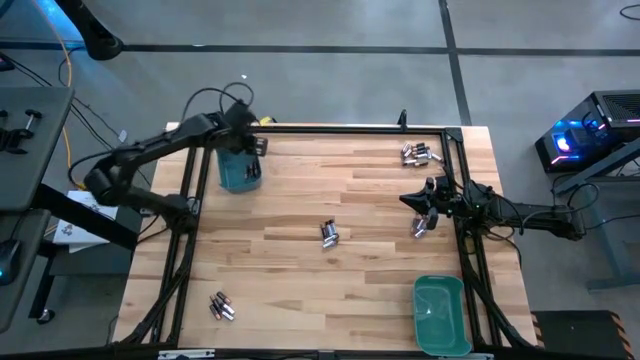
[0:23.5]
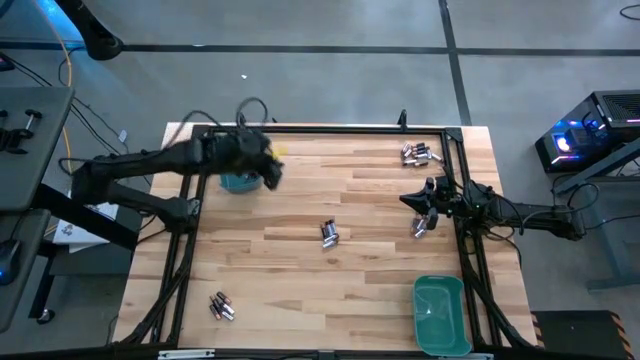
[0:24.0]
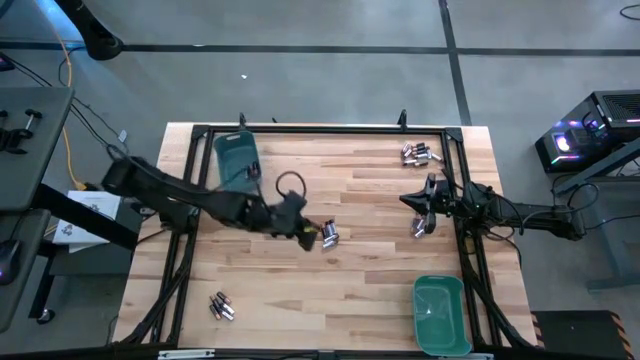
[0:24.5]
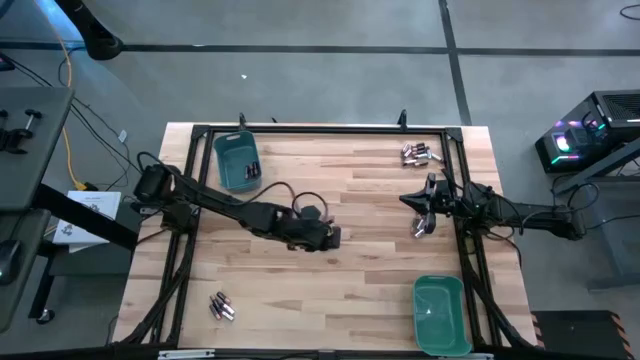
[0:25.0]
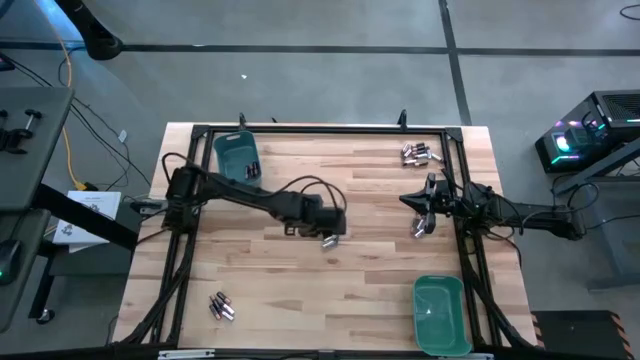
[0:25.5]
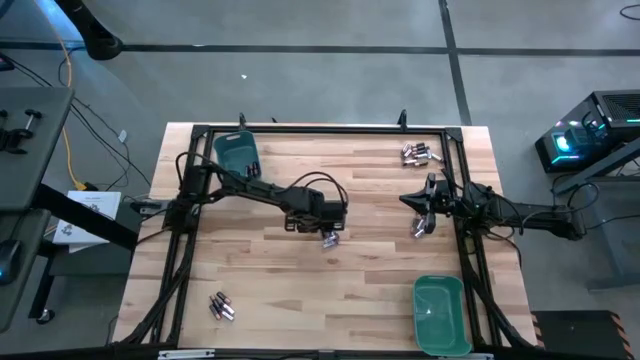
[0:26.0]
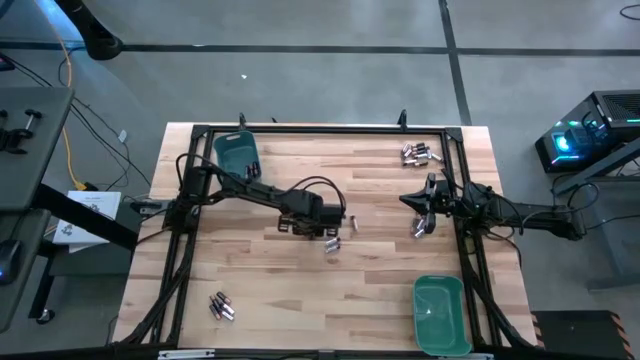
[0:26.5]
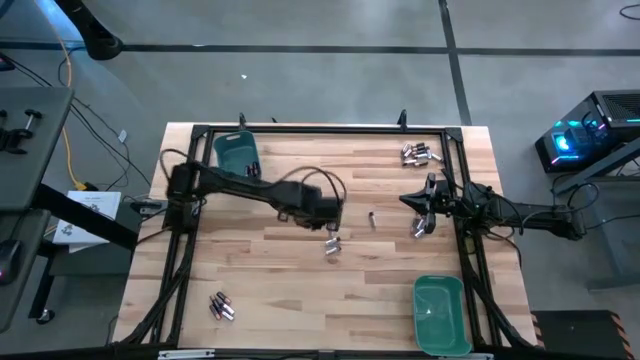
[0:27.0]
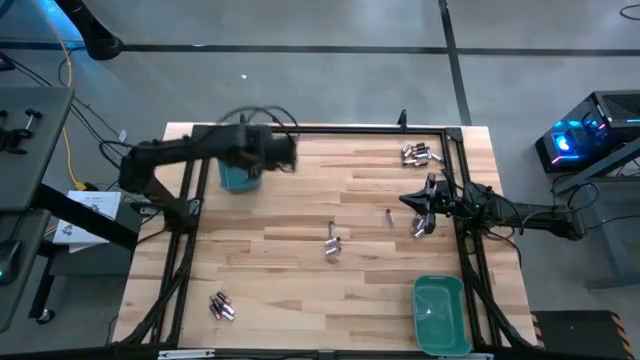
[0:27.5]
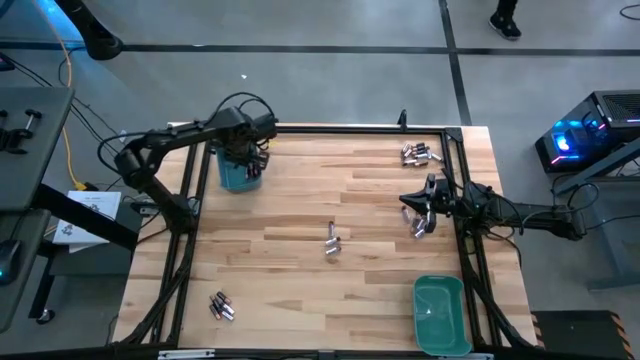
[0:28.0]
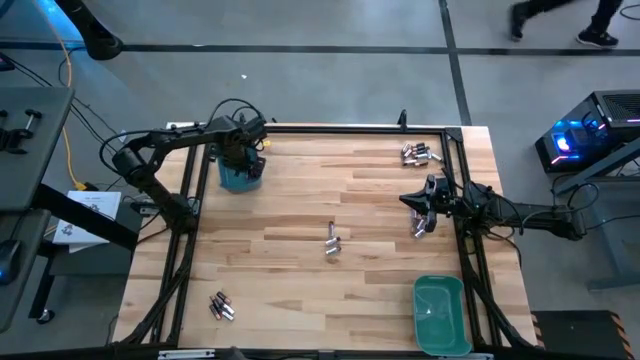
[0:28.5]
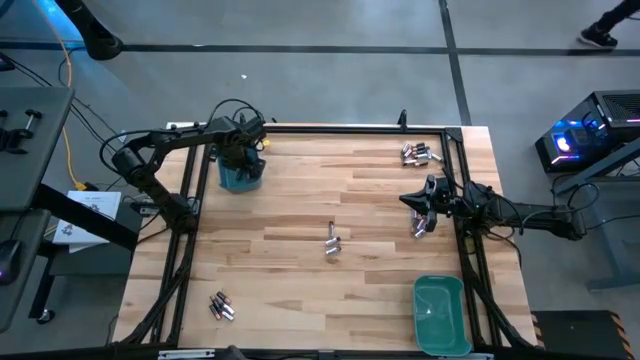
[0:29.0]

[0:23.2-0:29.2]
Task: Sort batteries
Put the black battery into the blue bin

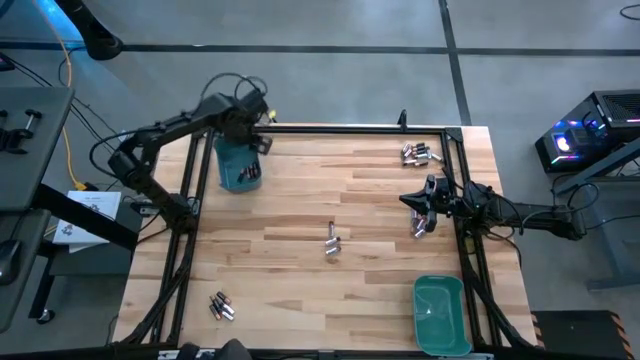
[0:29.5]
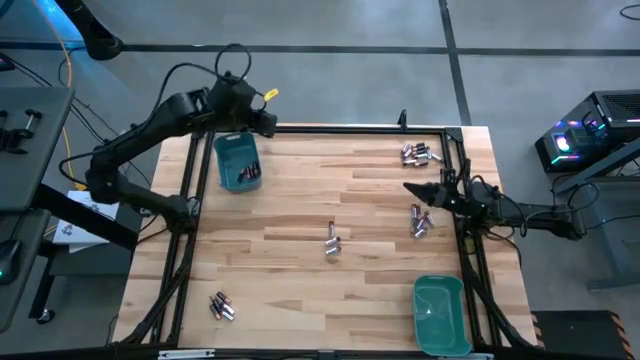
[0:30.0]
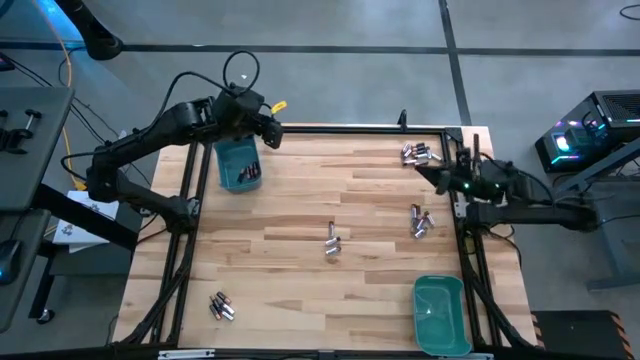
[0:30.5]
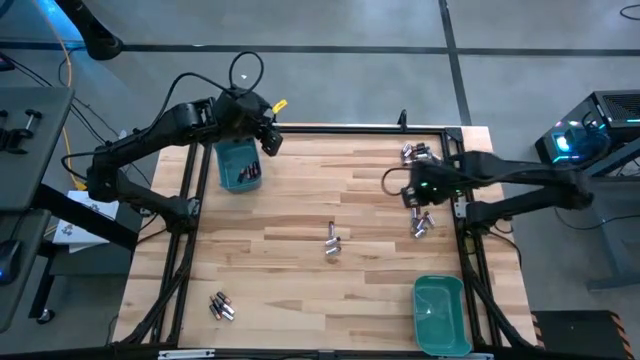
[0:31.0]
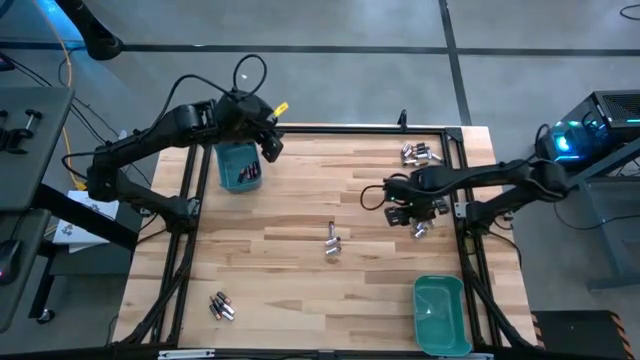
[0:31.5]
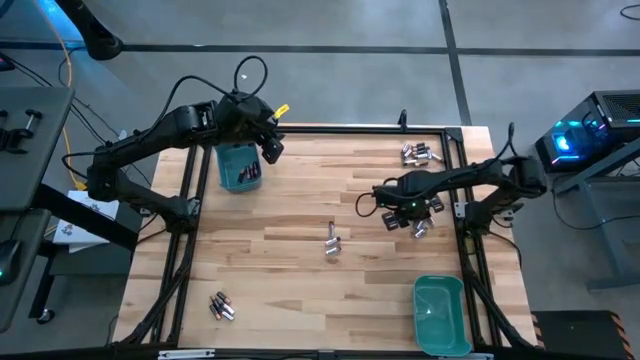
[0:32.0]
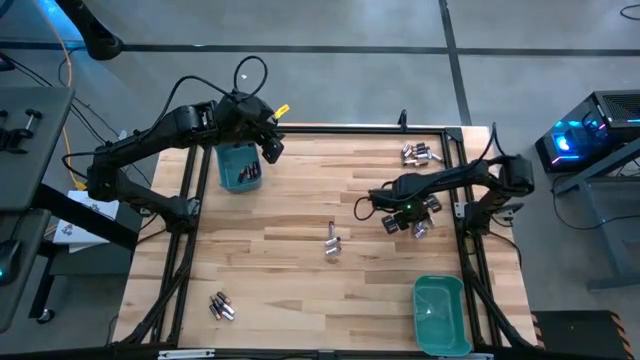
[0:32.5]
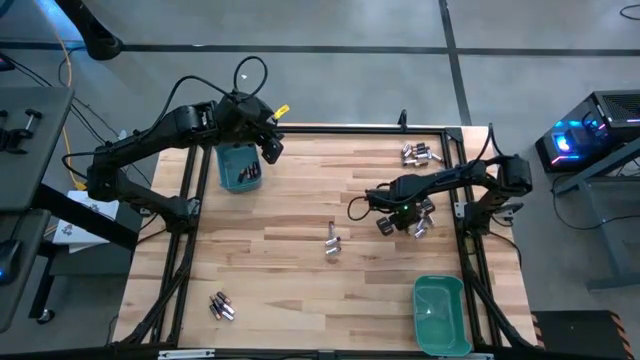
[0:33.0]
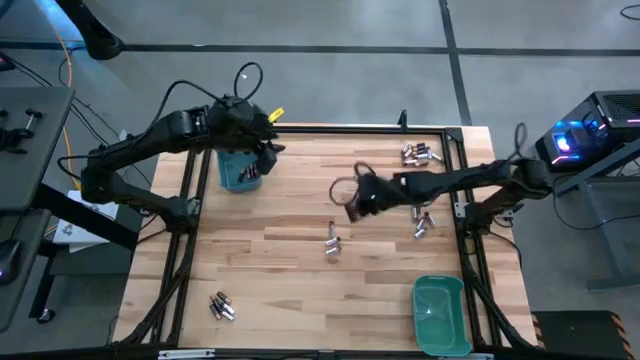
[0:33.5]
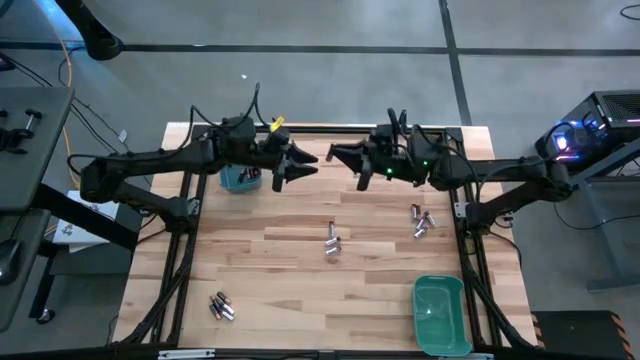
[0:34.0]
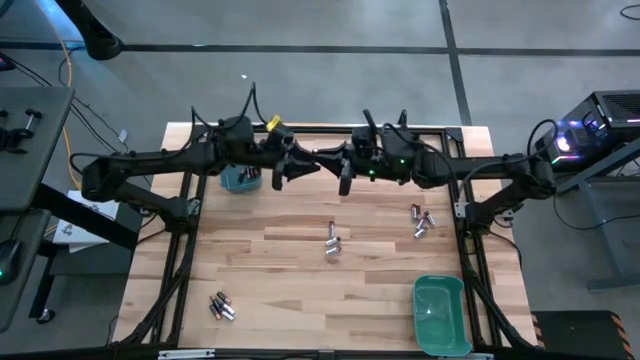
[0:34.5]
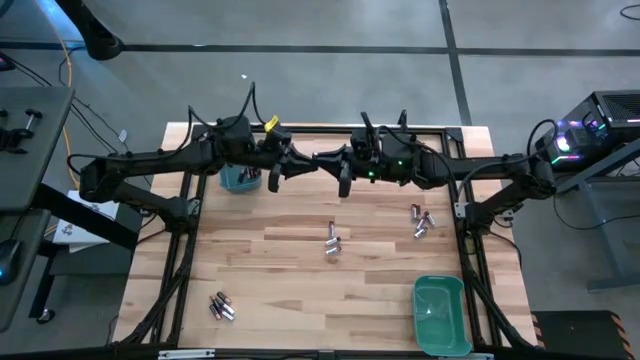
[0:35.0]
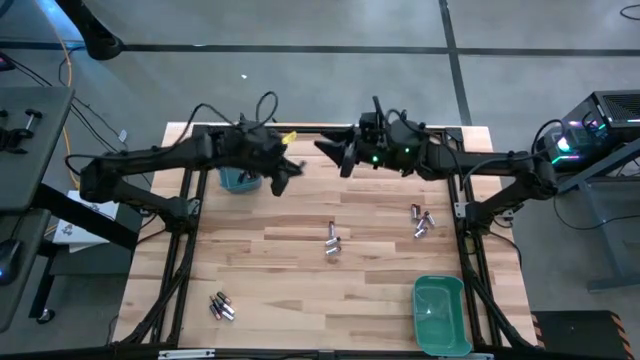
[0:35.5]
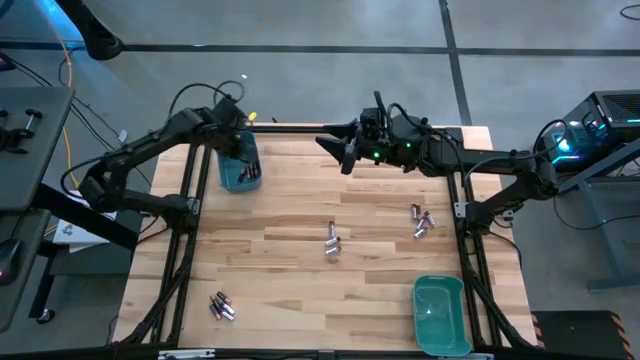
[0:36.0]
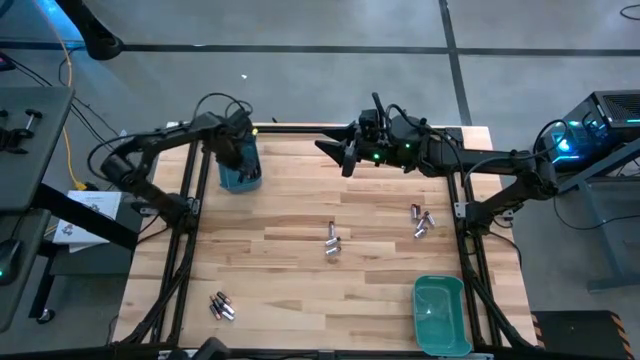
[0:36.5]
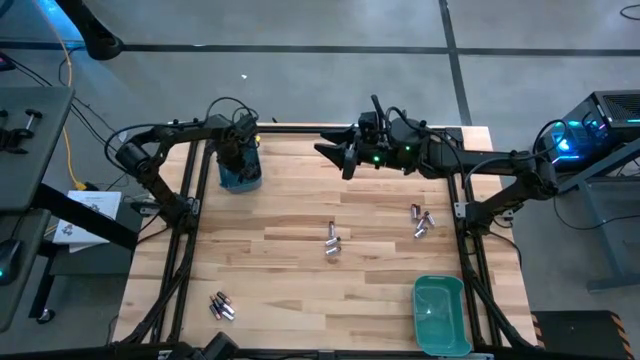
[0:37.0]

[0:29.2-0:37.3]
Put the black battery into the blue bin

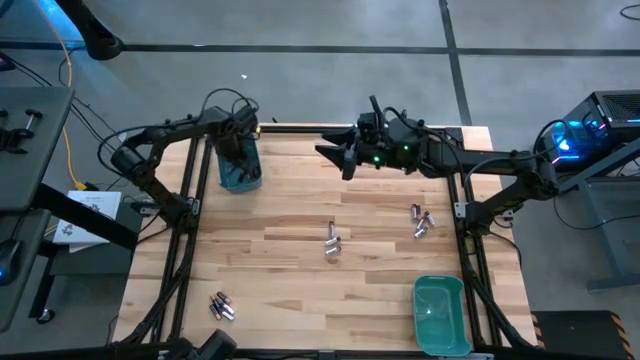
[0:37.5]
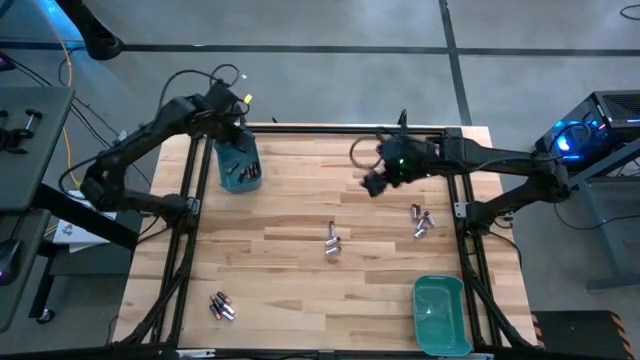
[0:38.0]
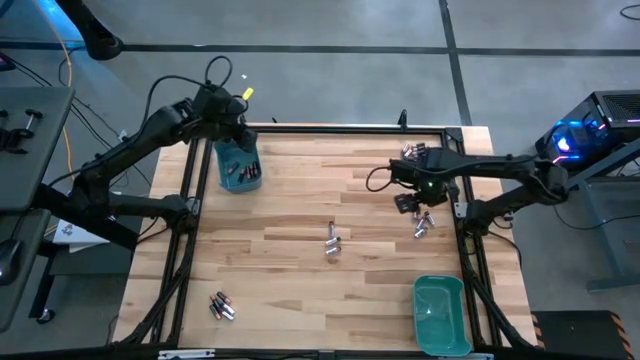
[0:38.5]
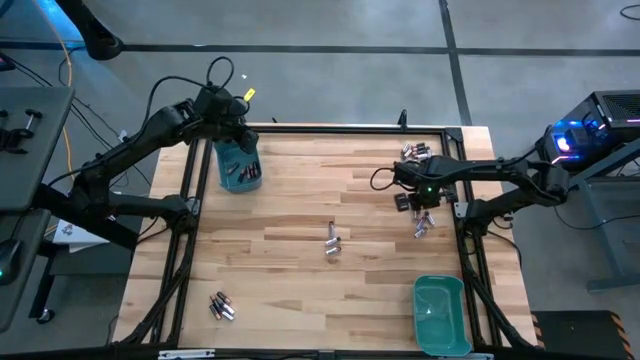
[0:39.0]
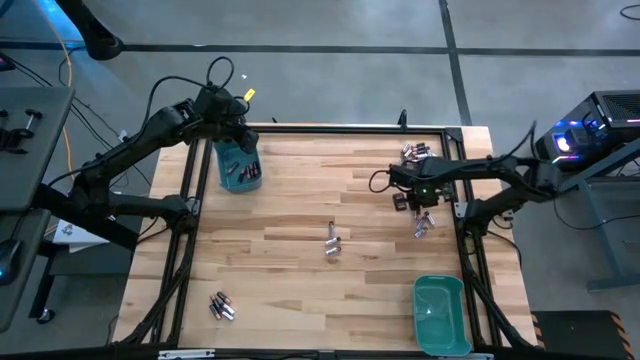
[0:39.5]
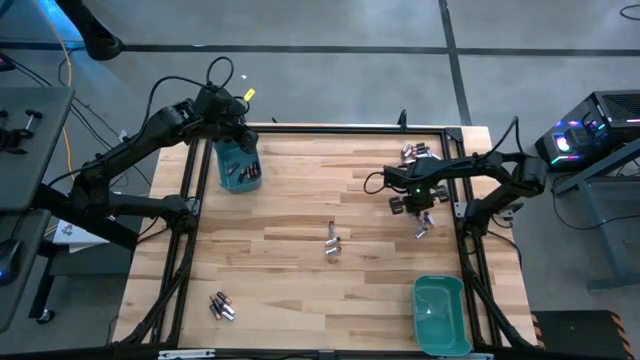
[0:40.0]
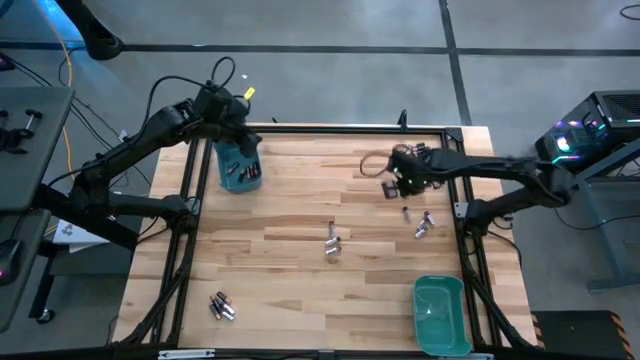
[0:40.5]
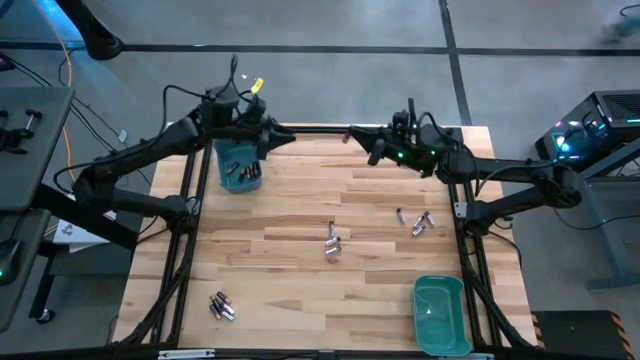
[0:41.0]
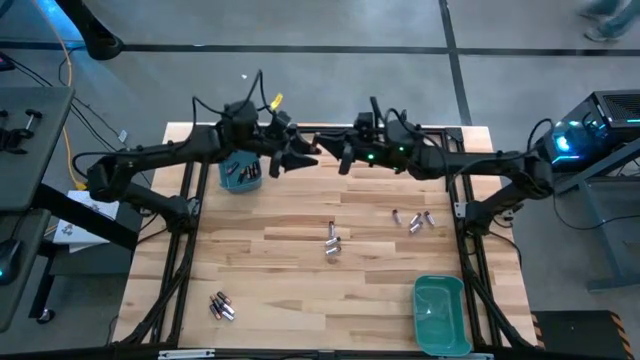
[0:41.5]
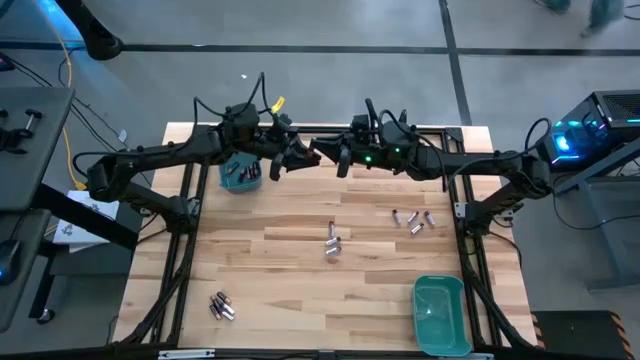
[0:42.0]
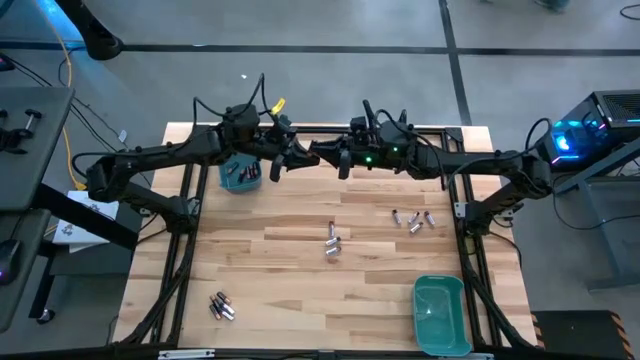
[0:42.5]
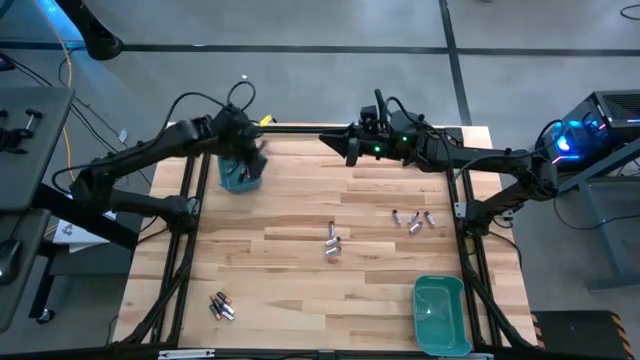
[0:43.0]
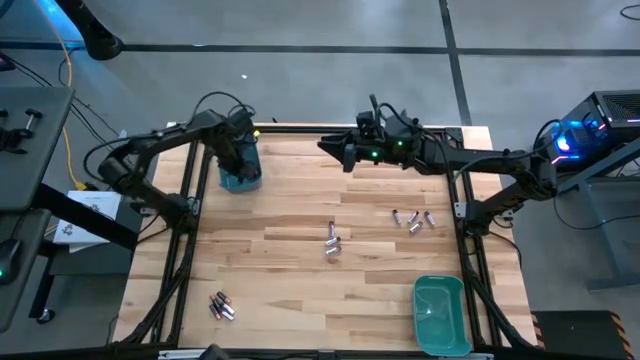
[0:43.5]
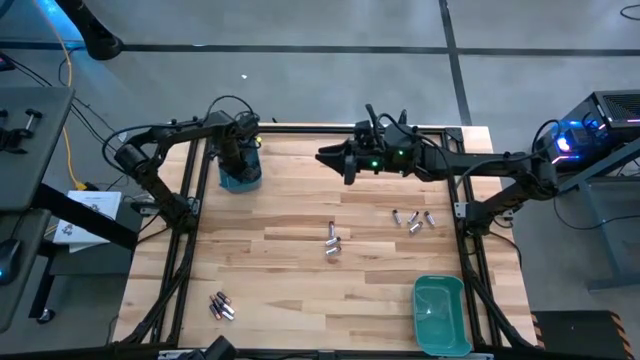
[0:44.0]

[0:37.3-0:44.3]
Put the black battery into the blue bin
